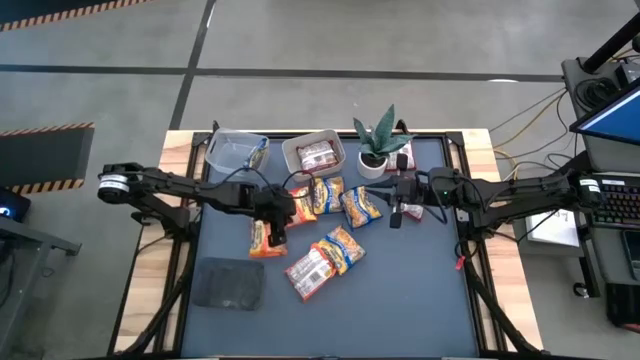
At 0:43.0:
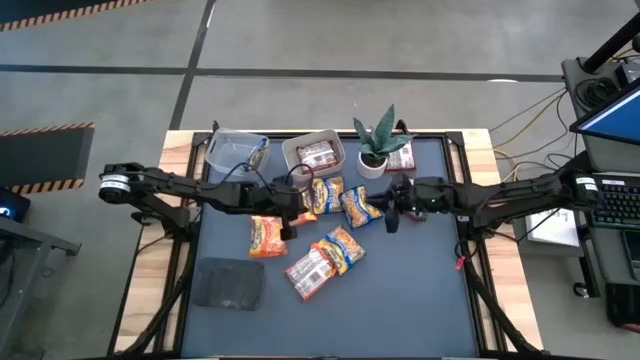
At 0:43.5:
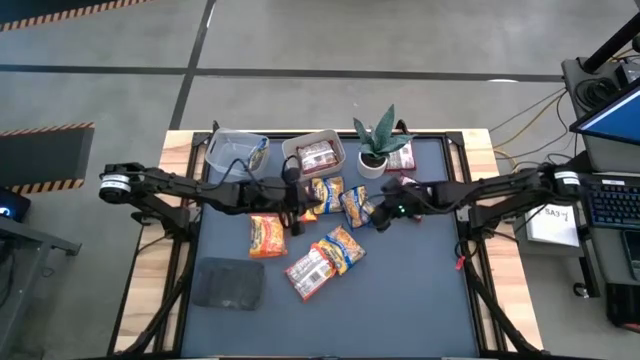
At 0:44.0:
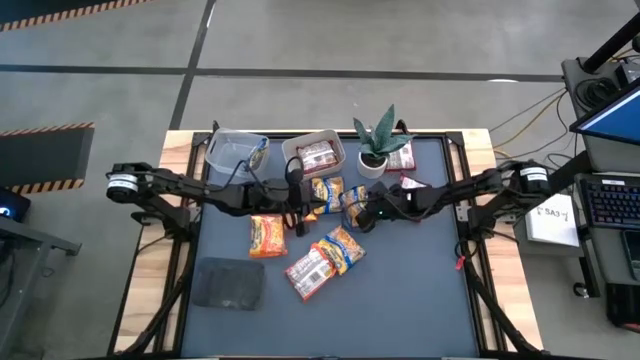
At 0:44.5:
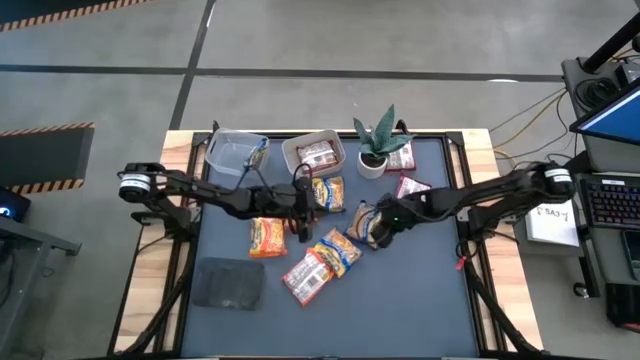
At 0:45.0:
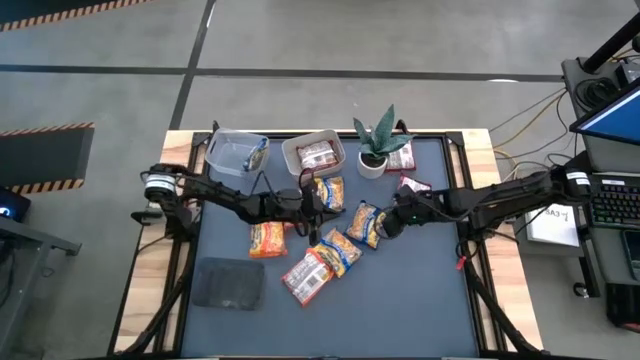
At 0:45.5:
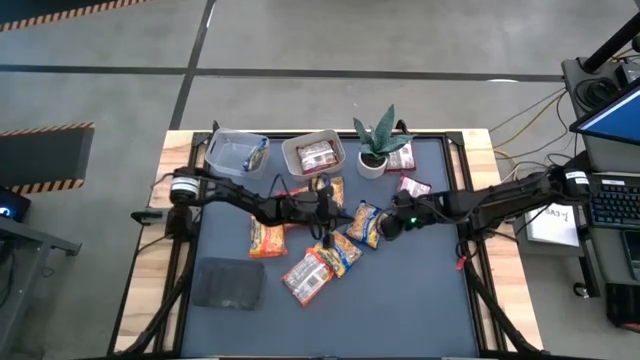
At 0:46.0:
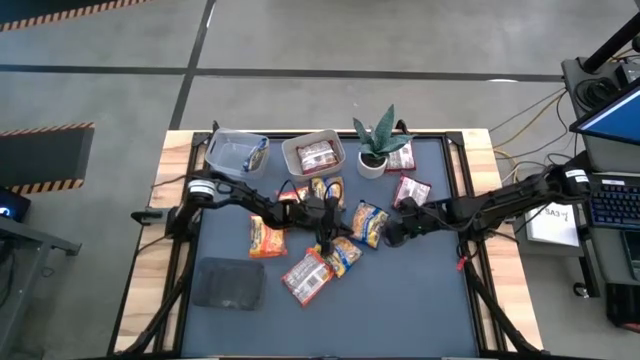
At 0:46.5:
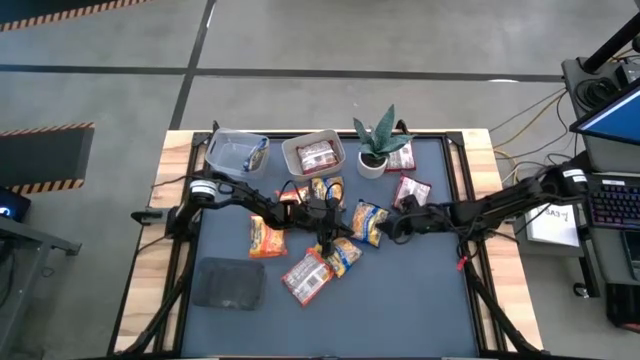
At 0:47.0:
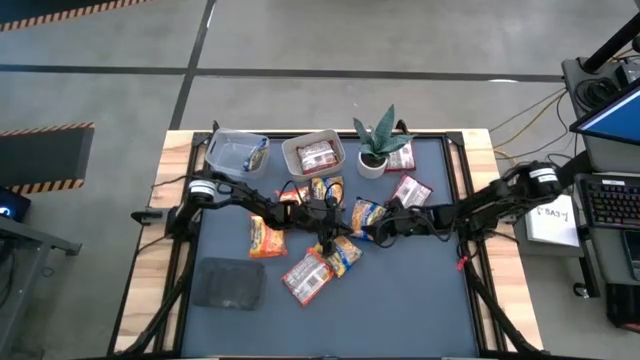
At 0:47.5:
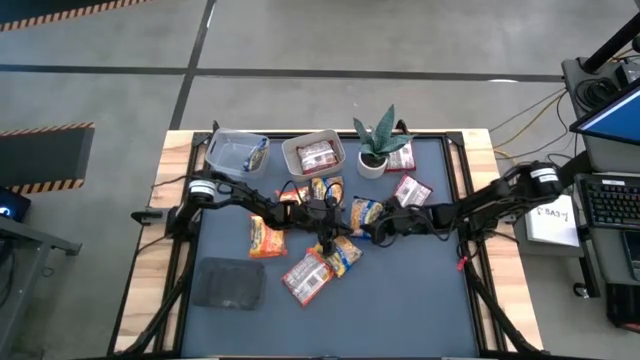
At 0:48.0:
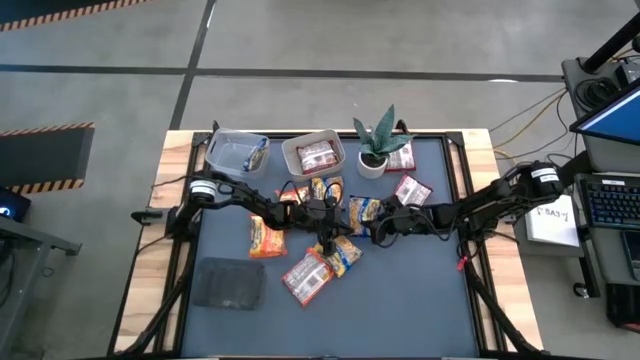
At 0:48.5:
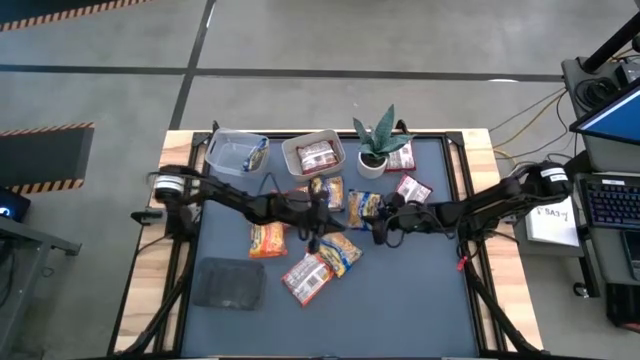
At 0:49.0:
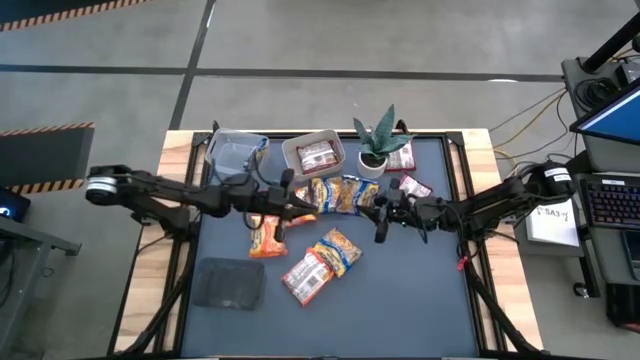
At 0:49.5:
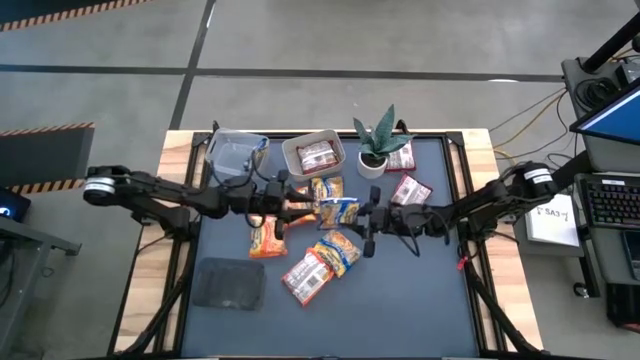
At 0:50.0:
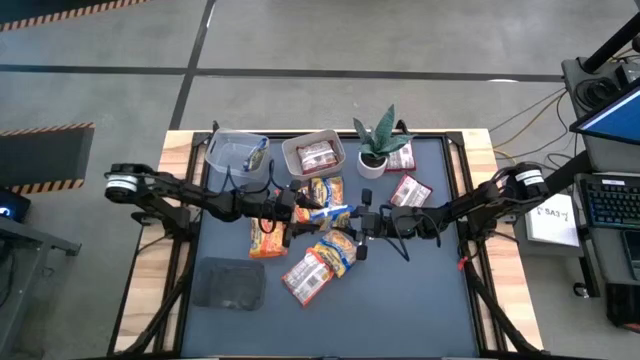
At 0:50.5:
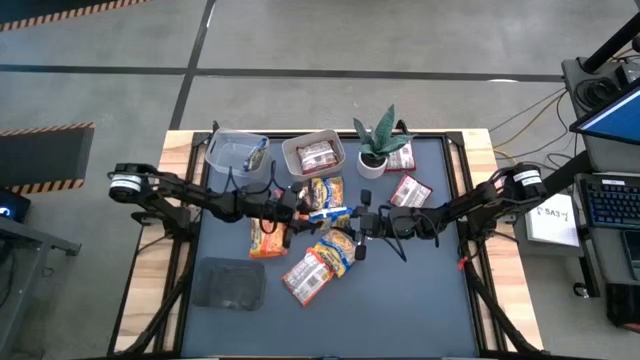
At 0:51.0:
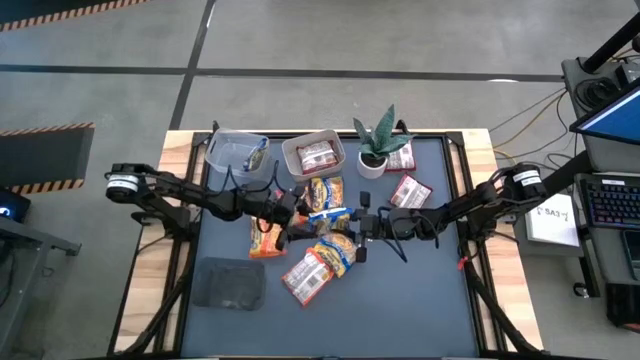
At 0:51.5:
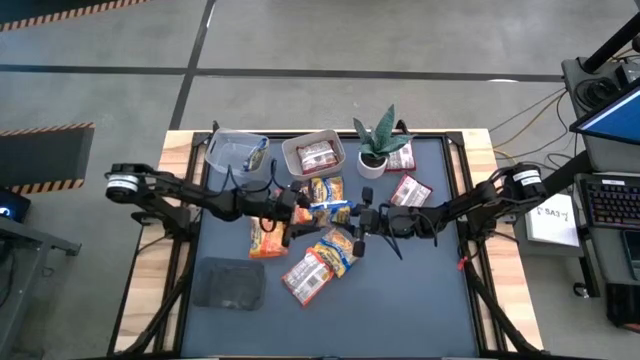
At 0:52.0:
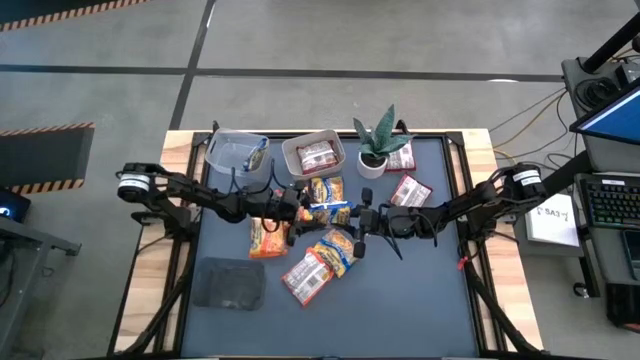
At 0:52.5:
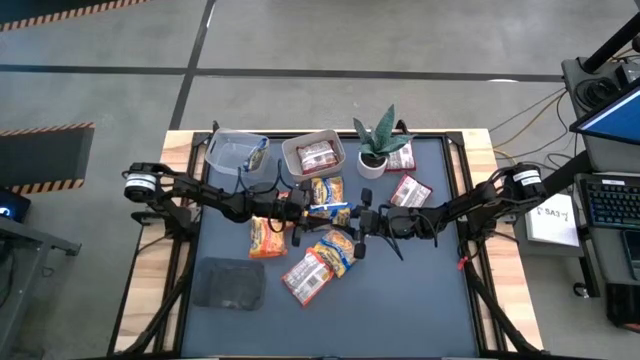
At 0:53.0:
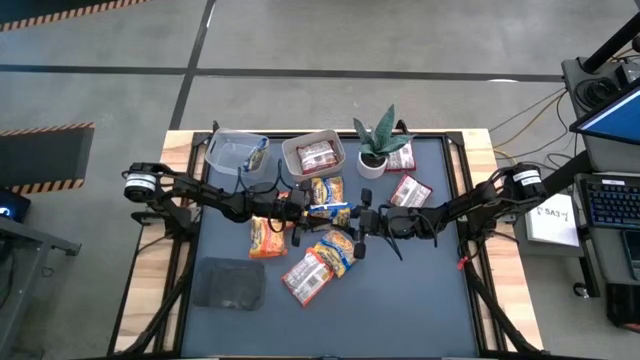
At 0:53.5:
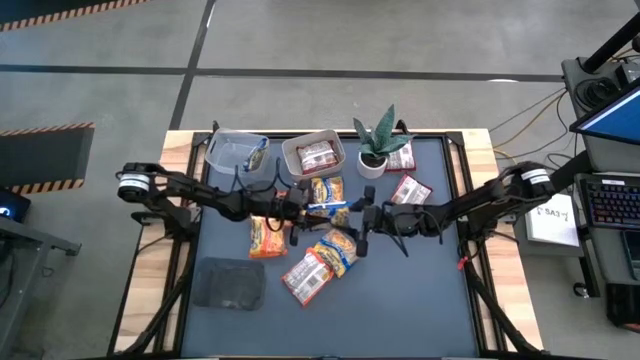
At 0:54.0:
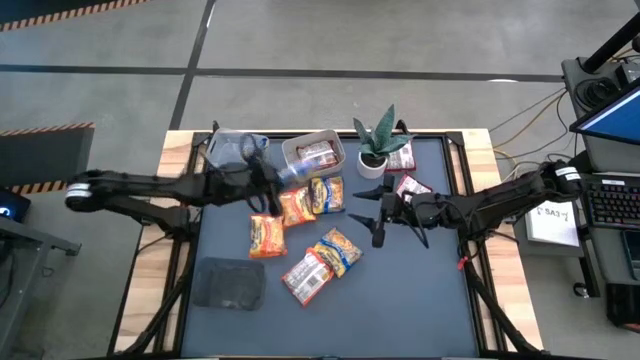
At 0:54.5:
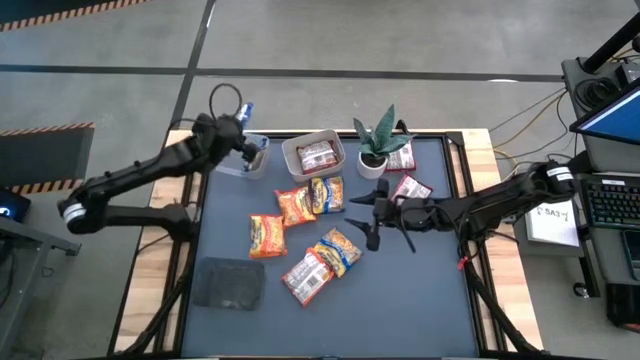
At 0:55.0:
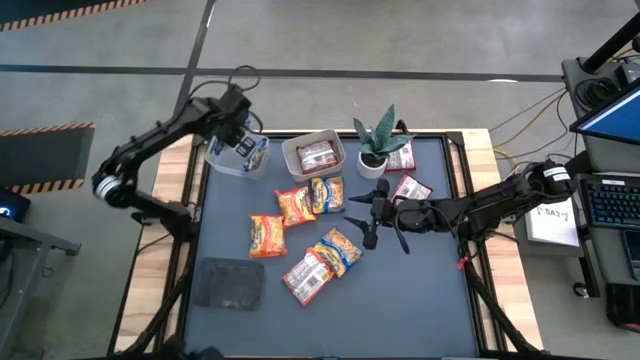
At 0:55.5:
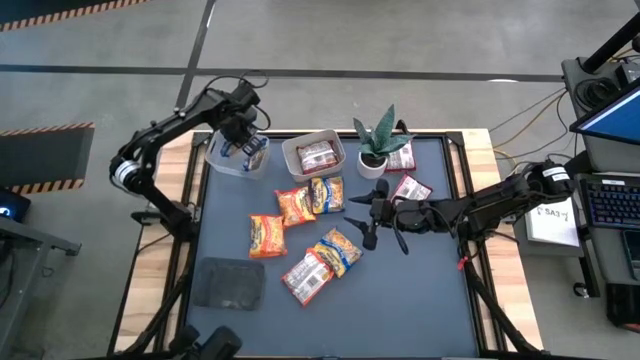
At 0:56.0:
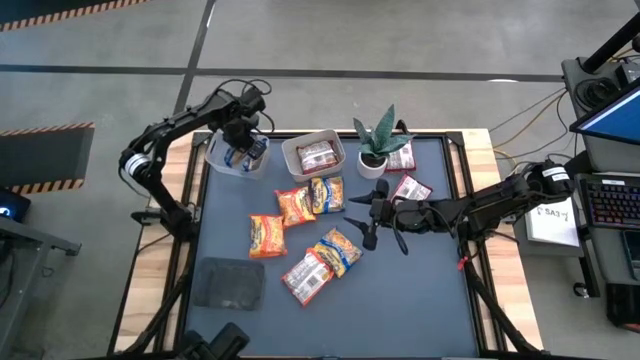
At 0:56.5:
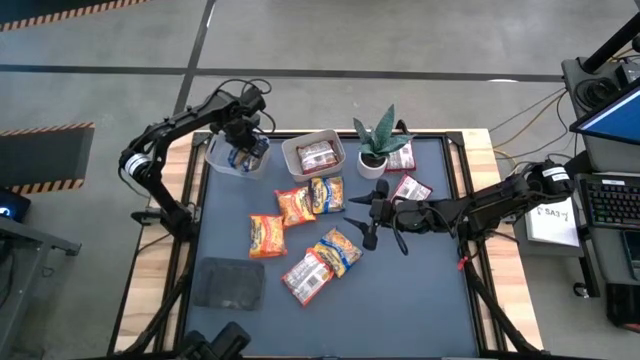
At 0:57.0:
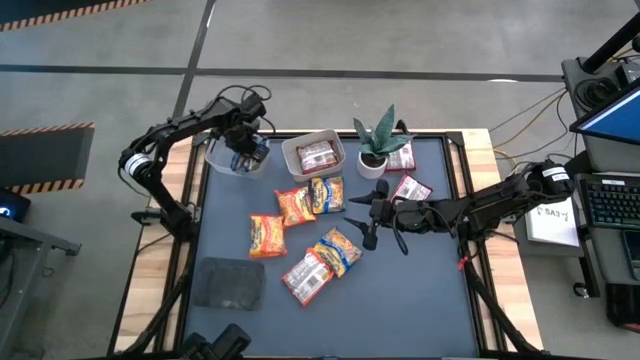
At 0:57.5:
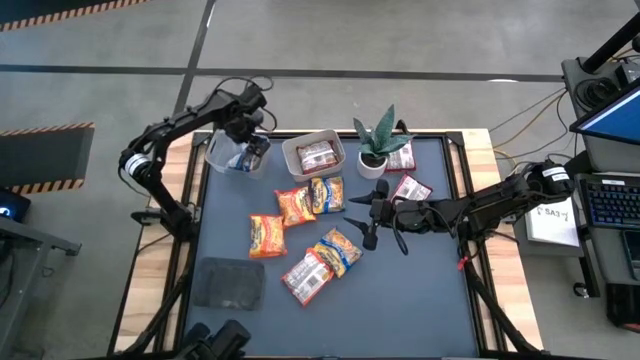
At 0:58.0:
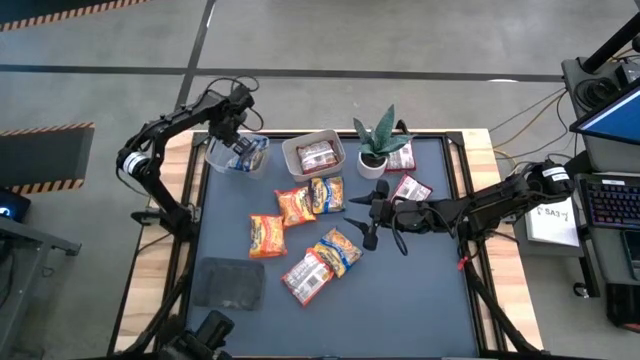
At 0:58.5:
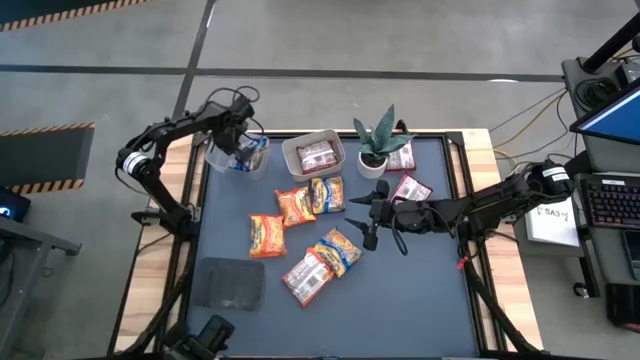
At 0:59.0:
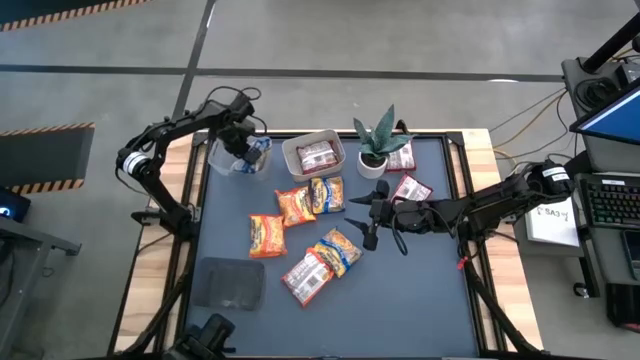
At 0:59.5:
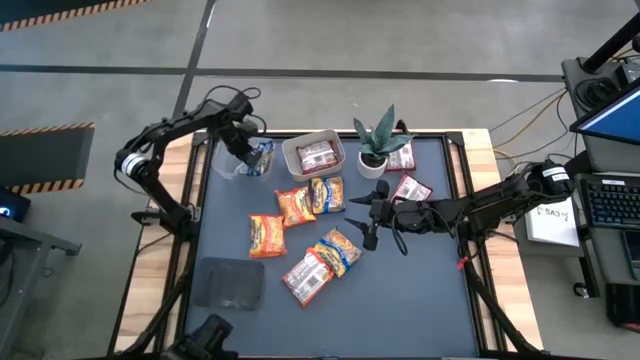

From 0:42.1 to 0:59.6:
Task: Sort Maruchan noodles
Put the blue noodle pack into the transparent bin

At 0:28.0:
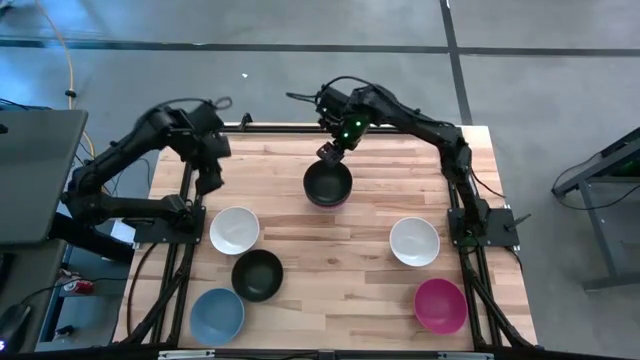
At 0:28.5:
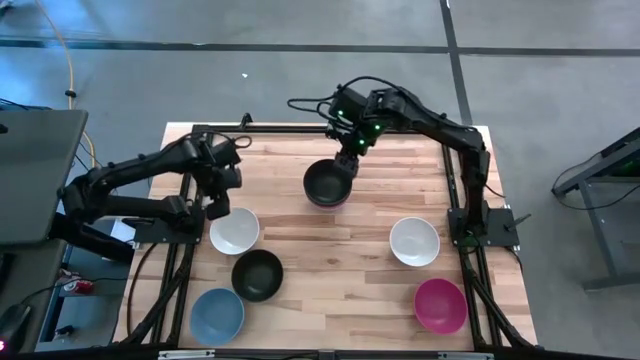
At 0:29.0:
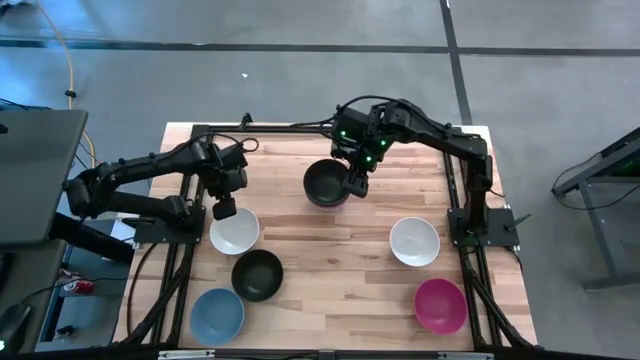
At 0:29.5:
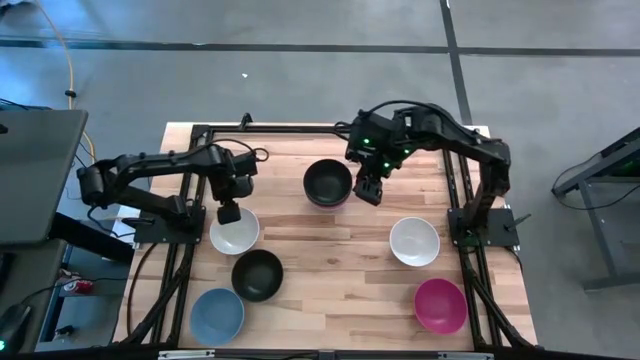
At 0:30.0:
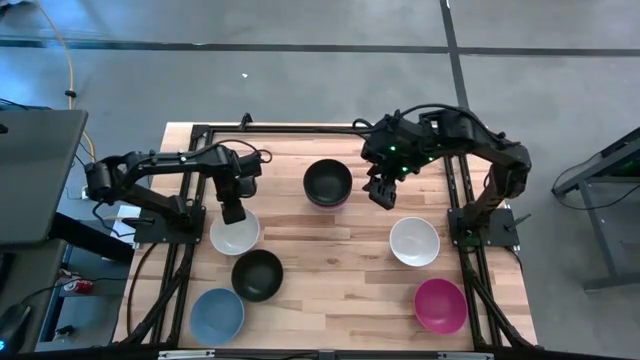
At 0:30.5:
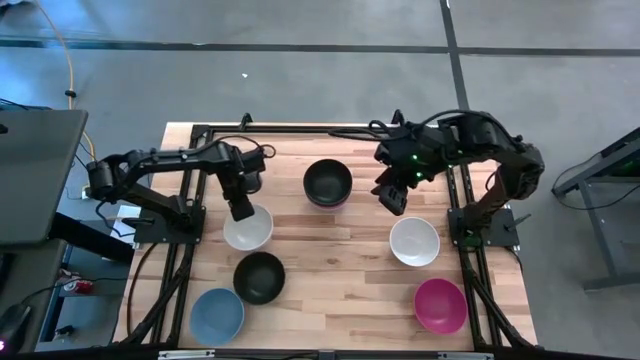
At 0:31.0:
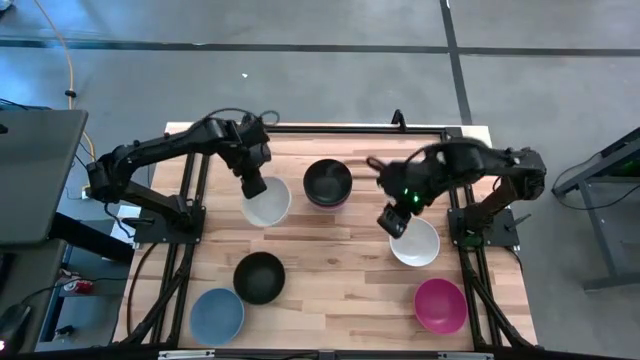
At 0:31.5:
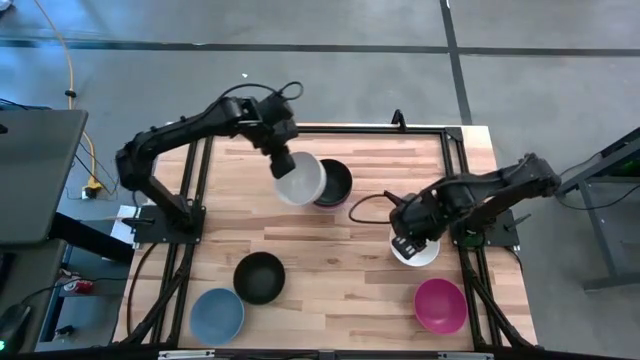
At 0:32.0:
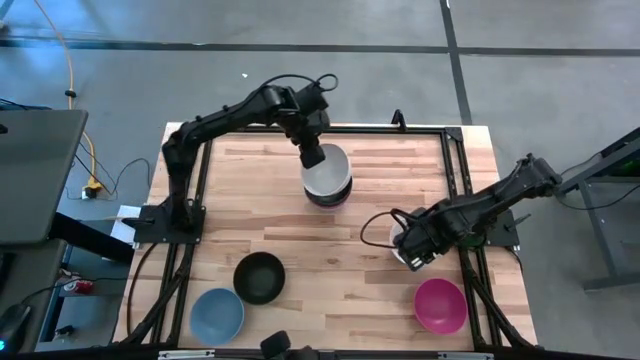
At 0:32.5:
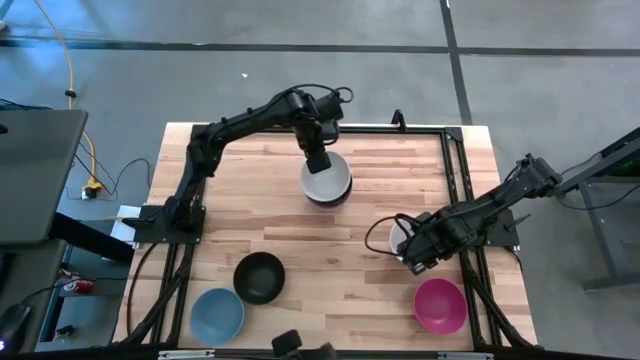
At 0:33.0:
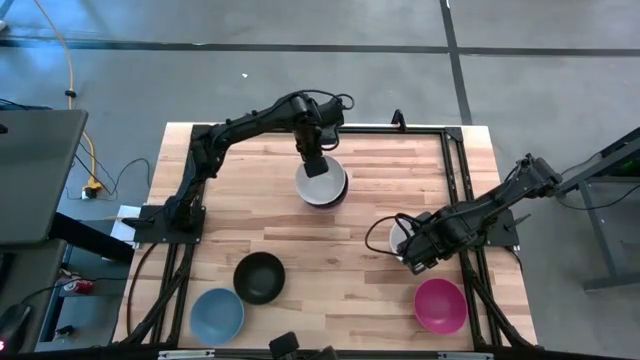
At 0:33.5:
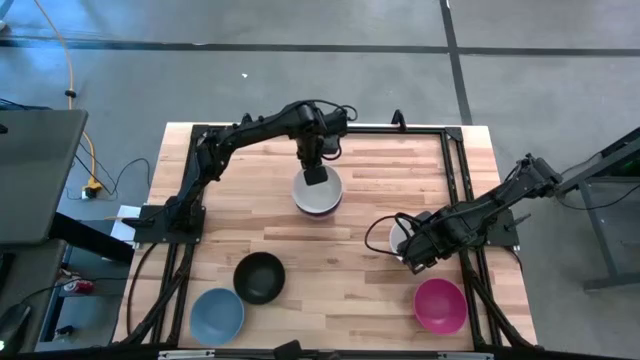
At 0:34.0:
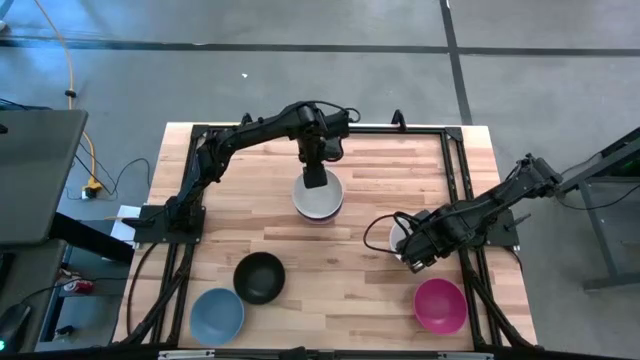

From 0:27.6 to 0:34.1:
Task: Nest bowls inside each other
Stack the left white bowl on top of the black bowl
